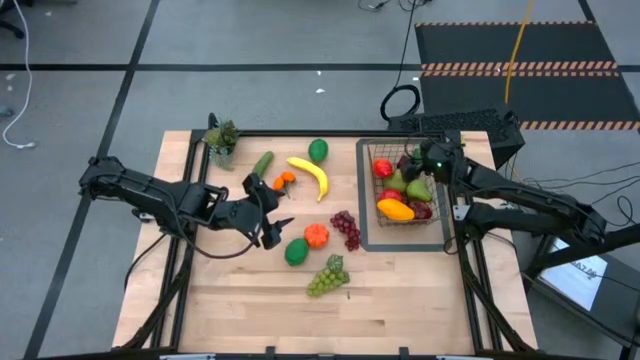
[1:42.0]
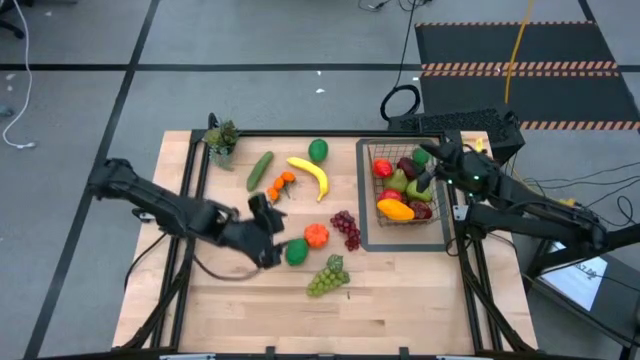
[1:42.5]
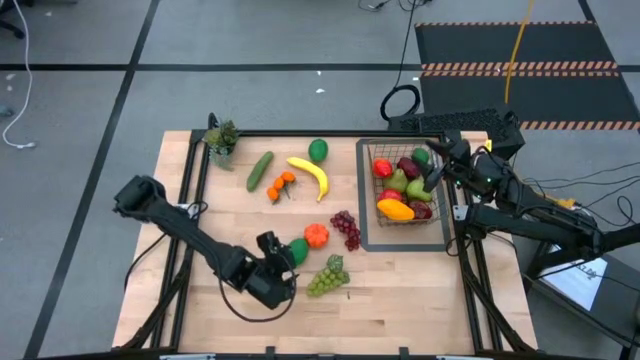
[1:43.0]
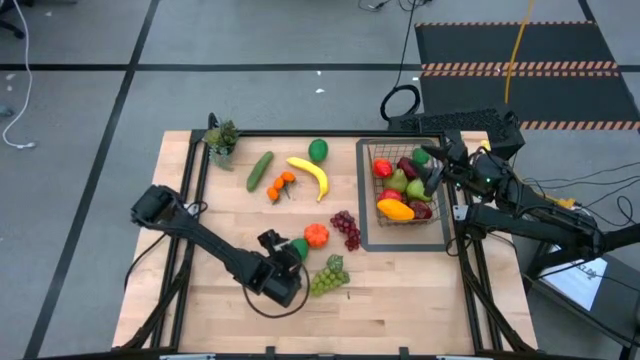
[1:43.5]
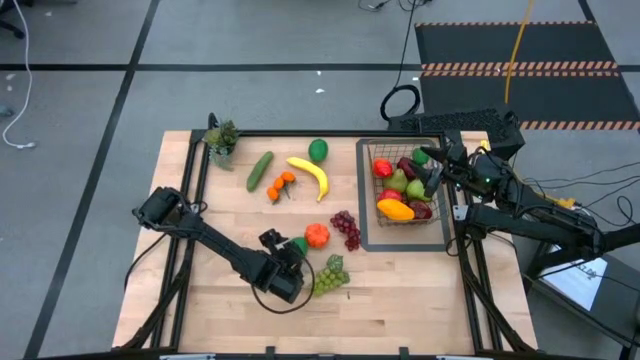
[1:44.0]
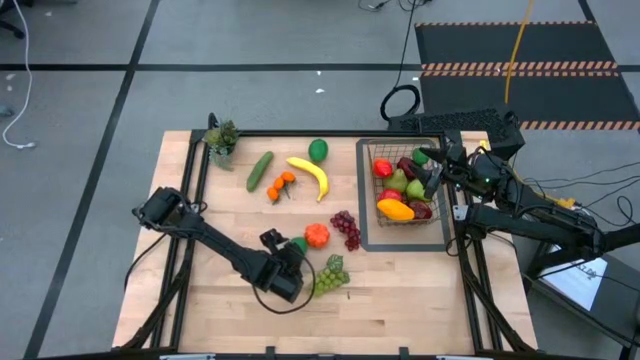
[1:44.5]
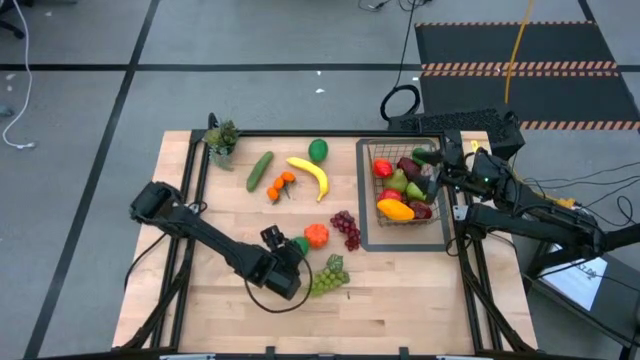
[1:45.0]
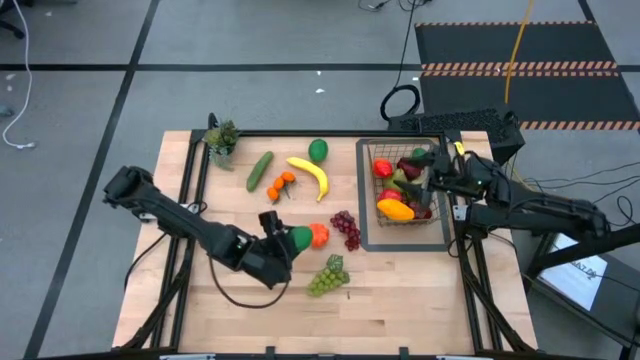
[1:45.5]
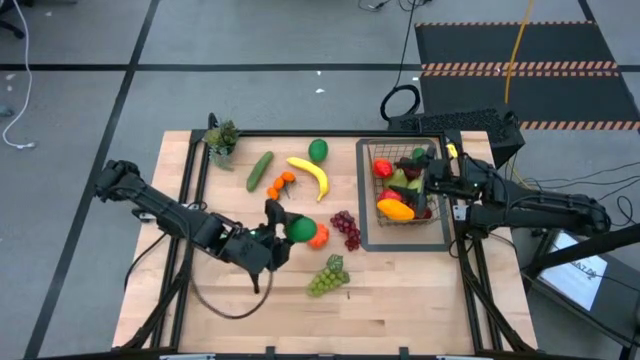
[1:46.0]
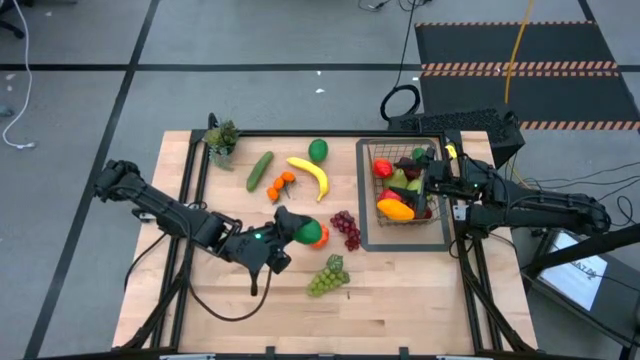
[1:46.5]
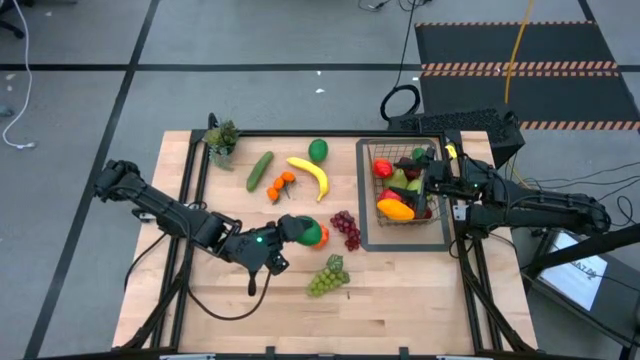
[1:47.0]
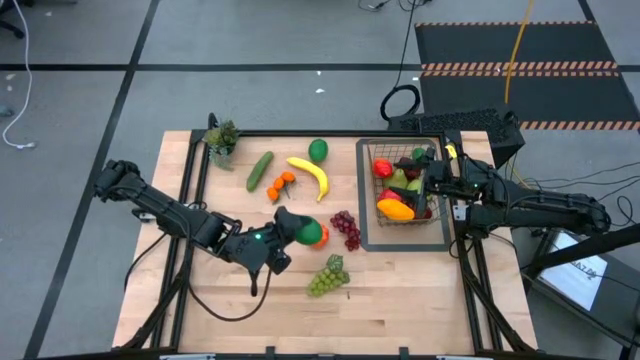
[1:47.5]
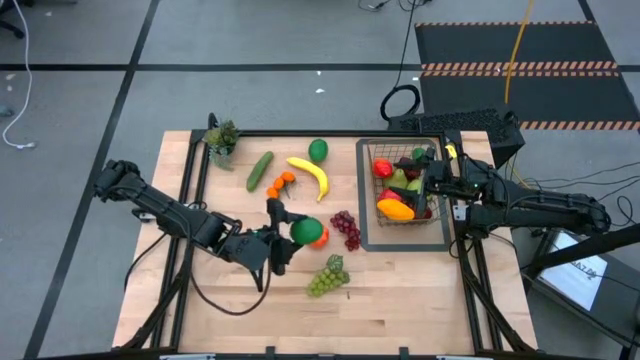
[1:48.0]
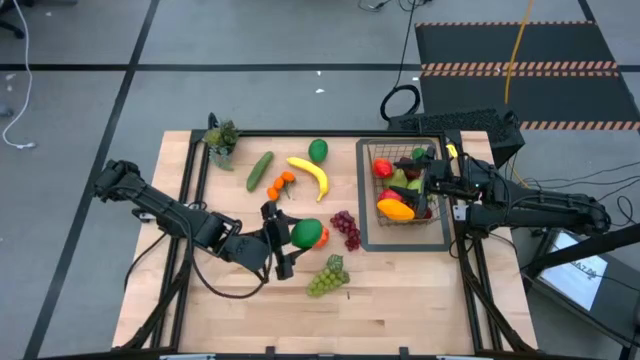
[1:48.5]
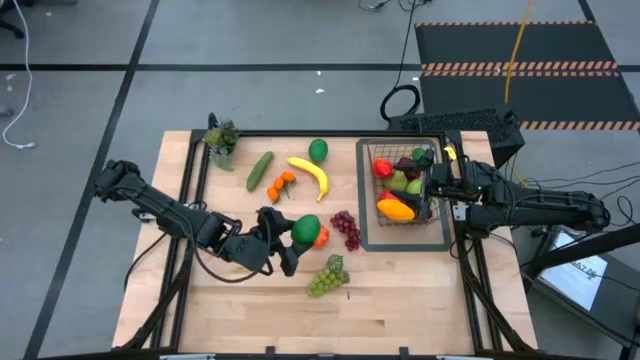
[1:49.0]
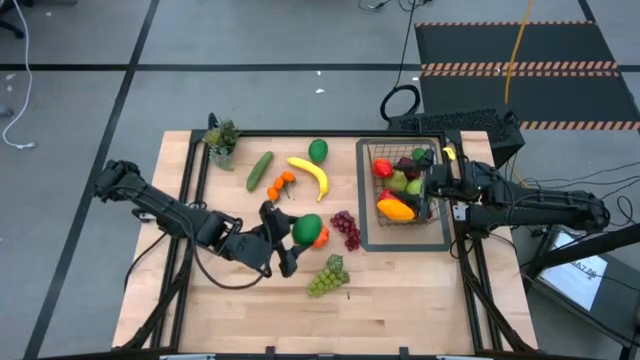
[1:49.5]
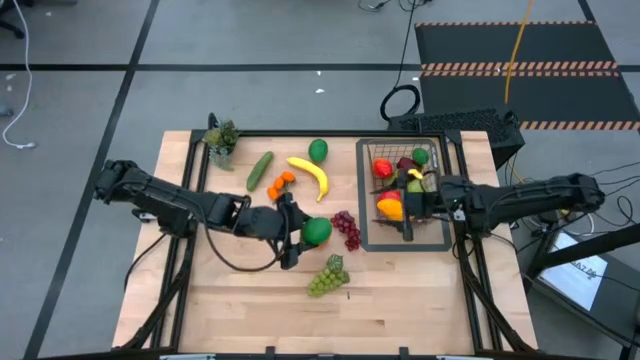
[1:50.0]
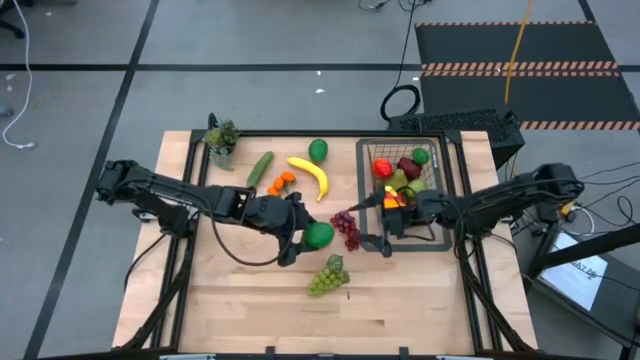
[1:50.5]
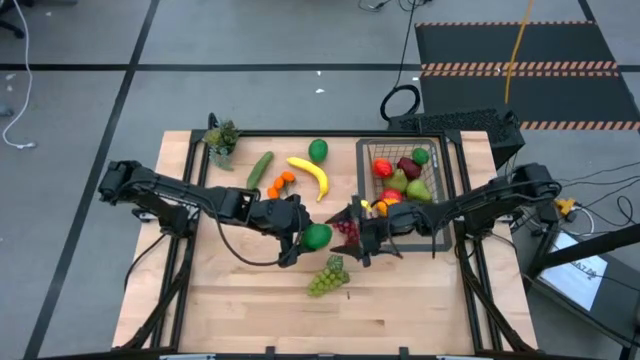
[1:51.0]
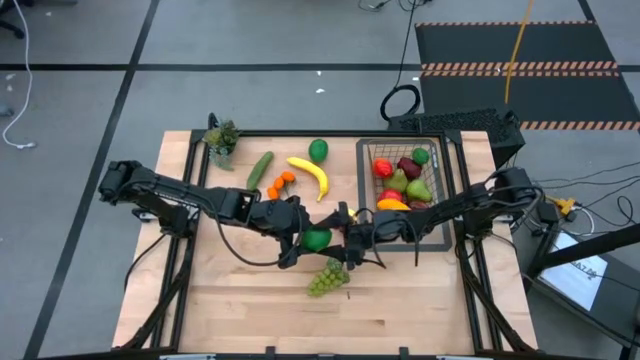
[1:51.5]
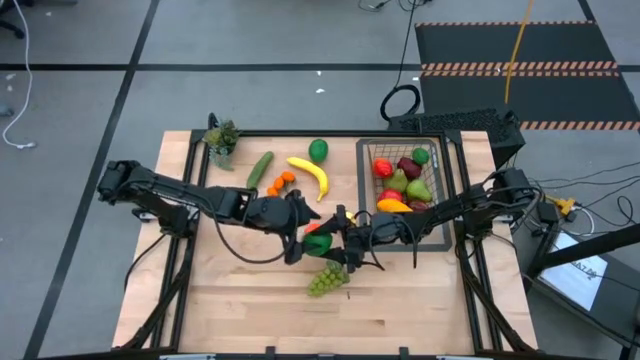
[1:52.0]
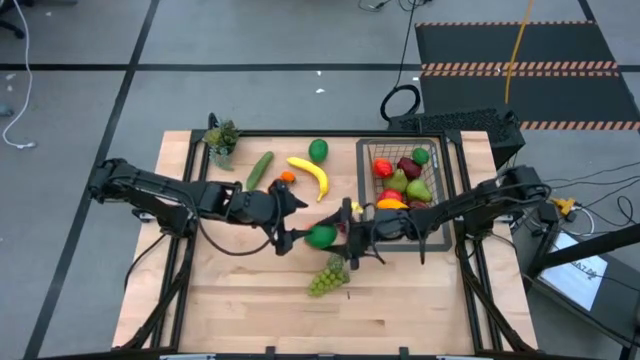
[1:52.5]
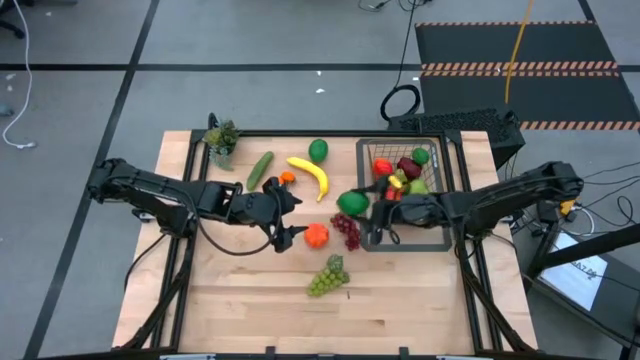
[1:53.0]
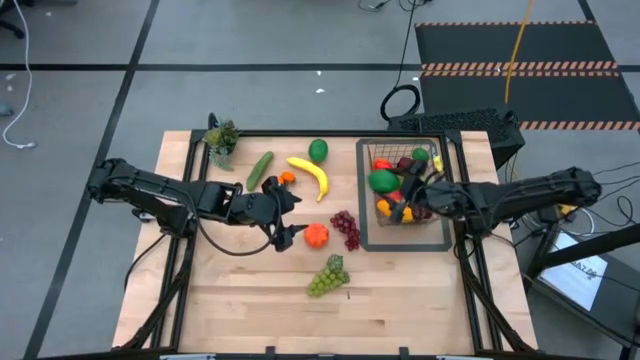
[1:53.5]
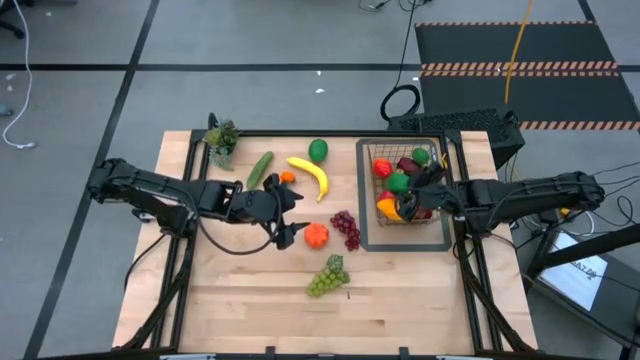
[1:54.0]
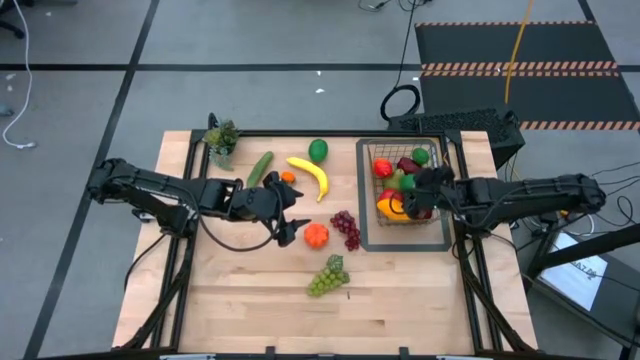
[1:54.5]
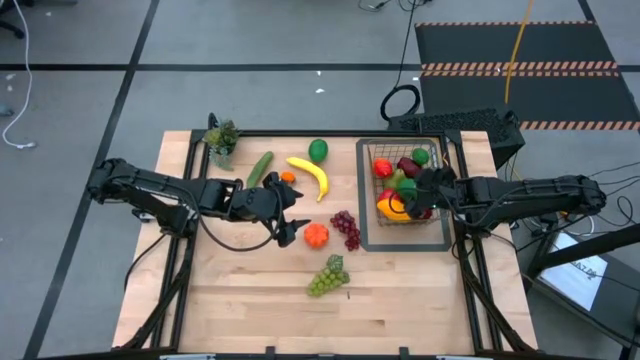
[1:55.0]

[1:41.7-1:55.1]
Task: Build produce basket
Put the bottom lime into the gold wire basket

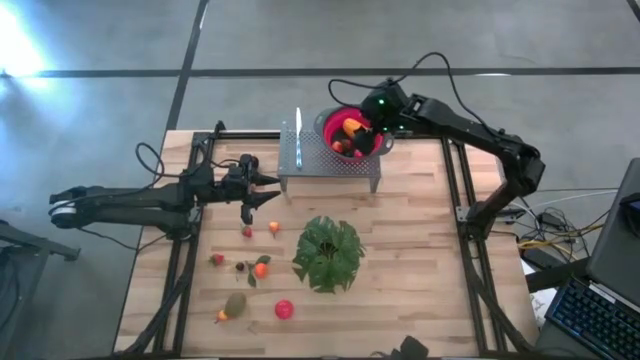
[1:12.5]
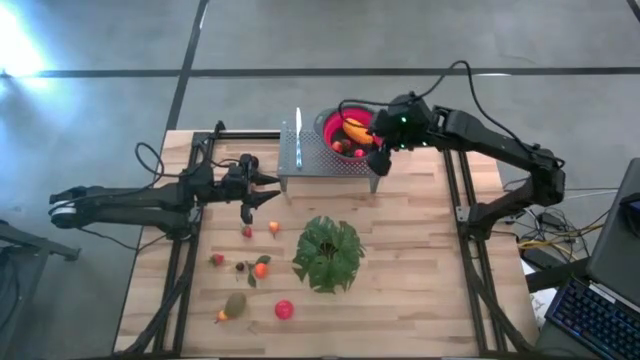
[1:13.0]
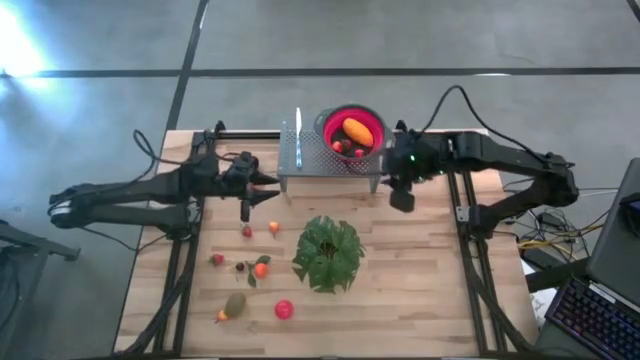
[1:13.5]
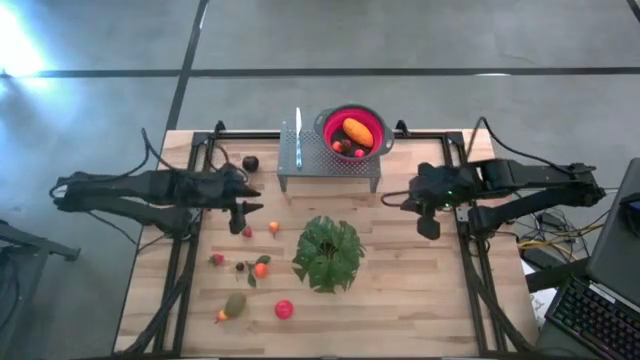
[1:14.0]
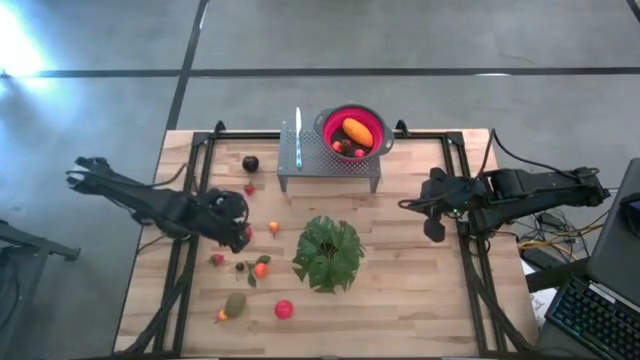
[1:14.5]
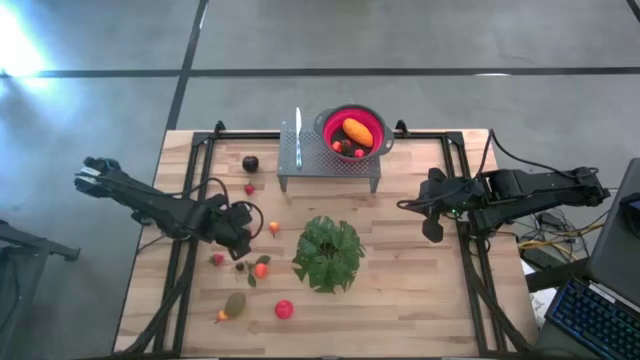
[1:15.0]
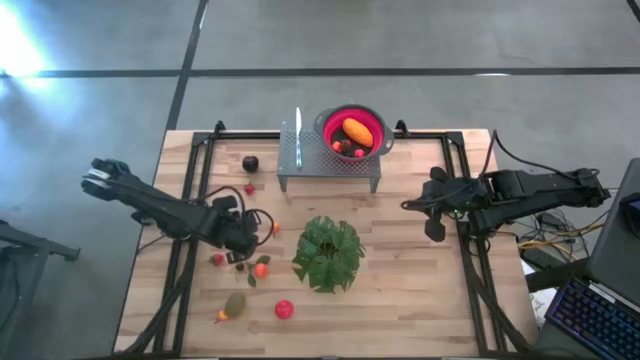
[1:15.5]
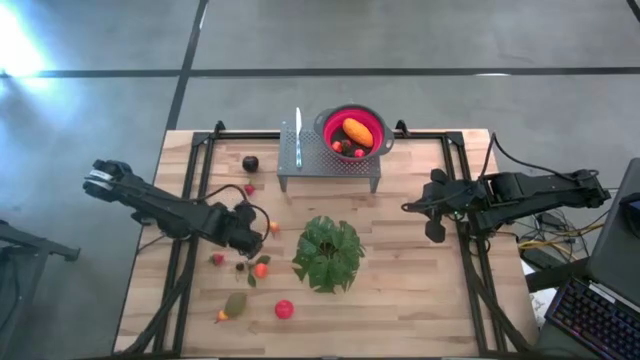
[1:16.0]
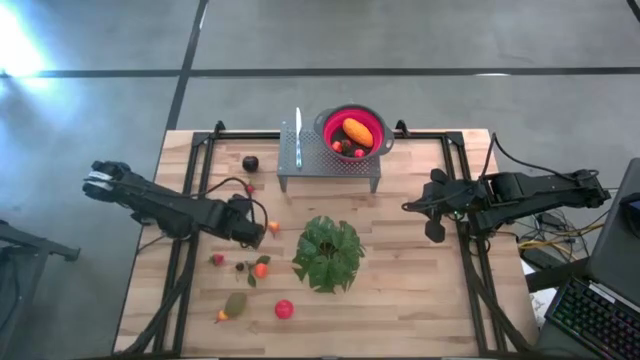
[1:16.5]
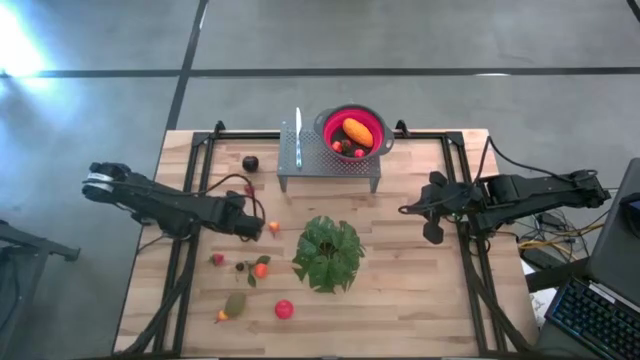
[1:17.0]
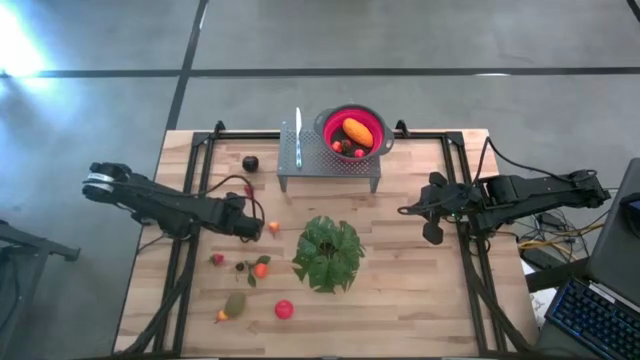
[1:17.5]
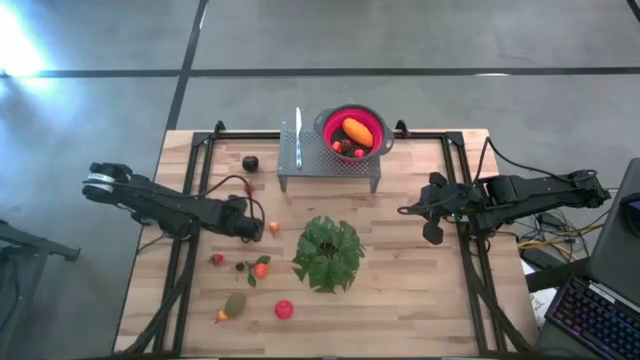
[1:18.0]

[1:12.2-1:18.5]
Task: Pick & Place Fruit
Put the red strawberry into the red strainer bowl on the shelf
